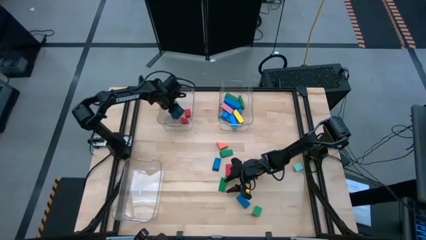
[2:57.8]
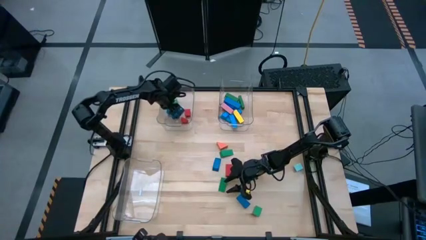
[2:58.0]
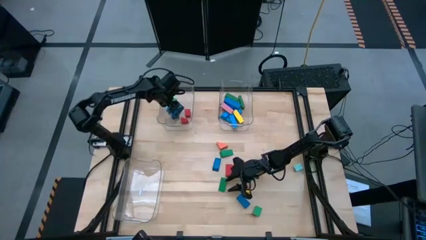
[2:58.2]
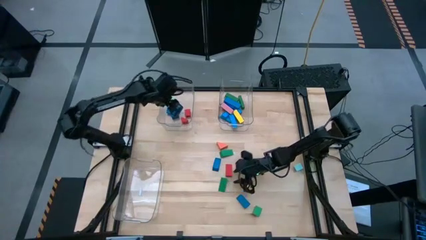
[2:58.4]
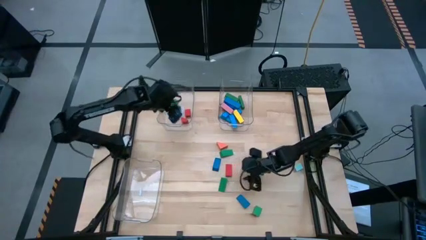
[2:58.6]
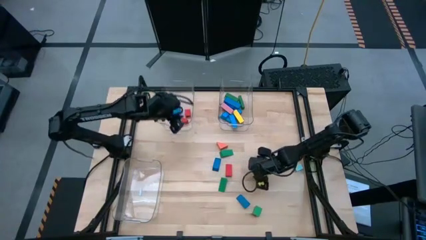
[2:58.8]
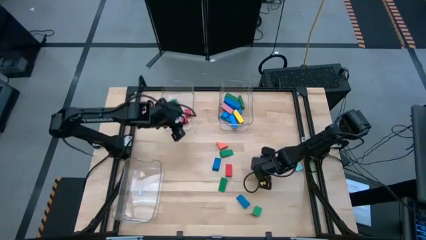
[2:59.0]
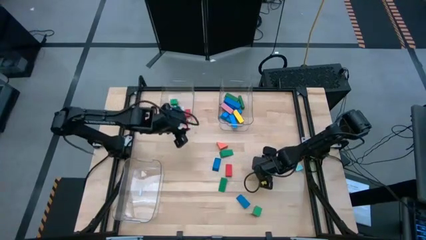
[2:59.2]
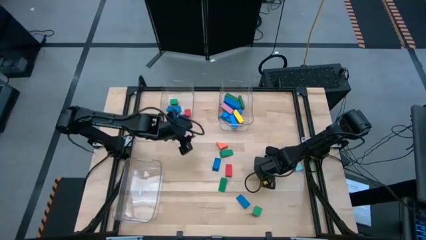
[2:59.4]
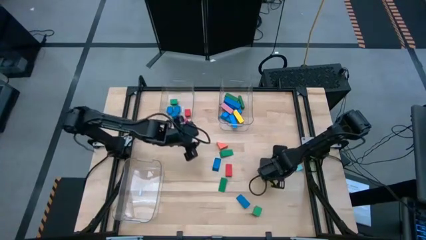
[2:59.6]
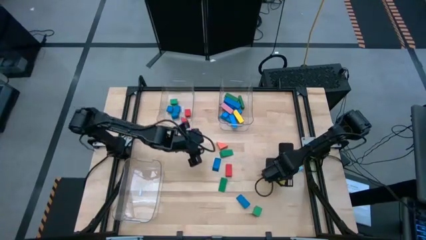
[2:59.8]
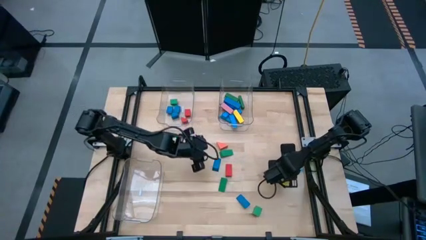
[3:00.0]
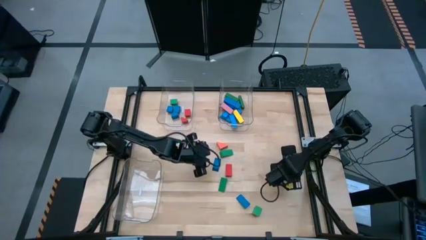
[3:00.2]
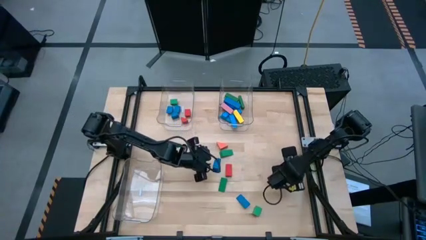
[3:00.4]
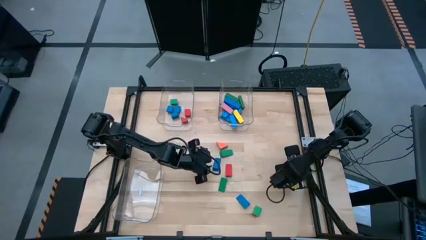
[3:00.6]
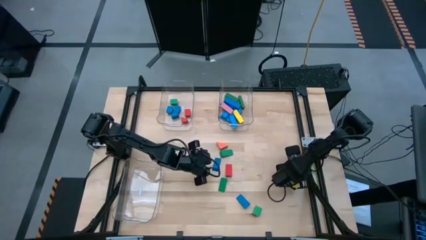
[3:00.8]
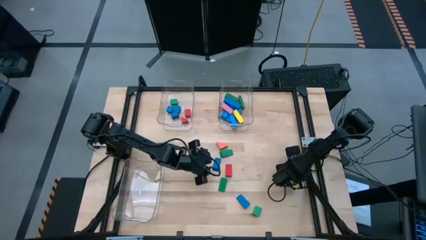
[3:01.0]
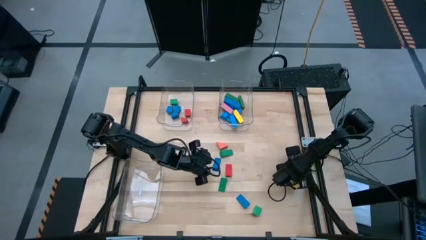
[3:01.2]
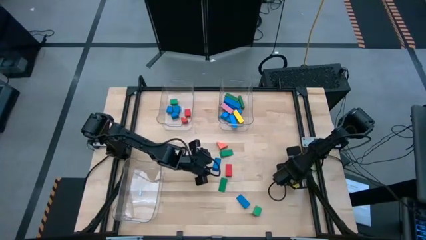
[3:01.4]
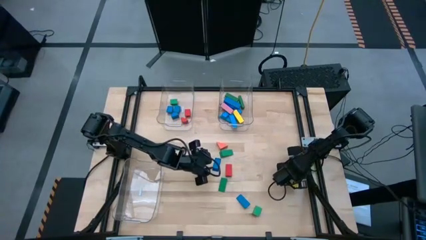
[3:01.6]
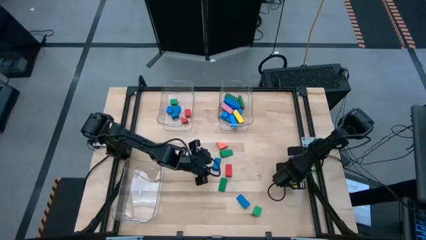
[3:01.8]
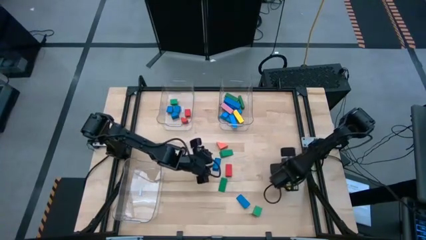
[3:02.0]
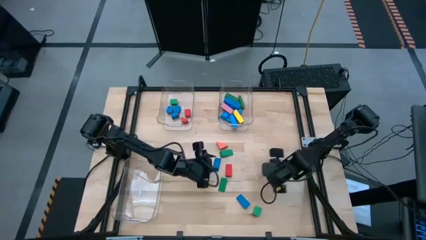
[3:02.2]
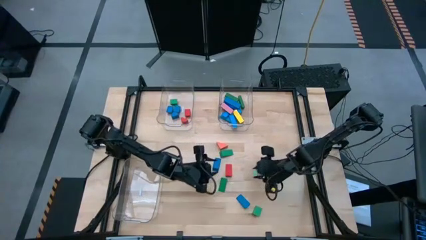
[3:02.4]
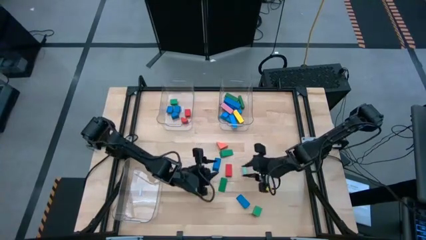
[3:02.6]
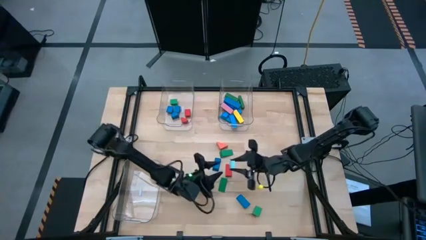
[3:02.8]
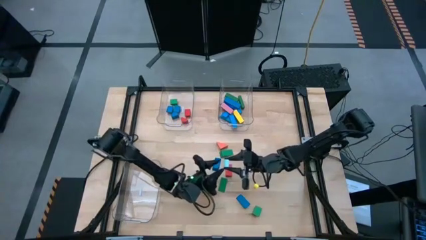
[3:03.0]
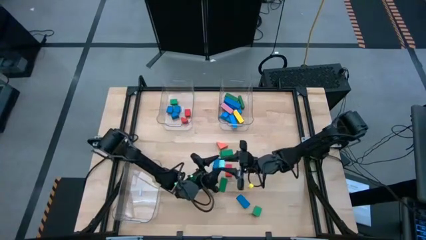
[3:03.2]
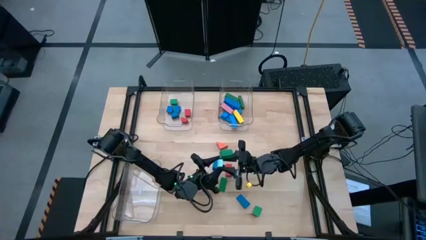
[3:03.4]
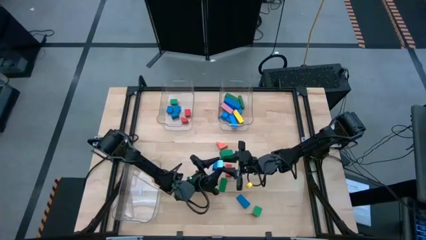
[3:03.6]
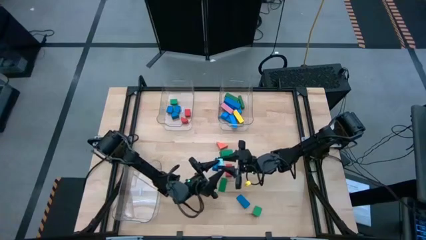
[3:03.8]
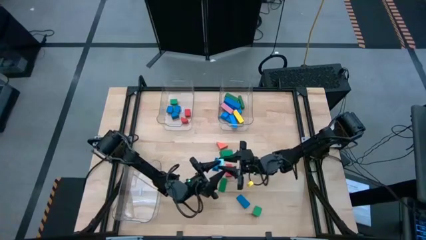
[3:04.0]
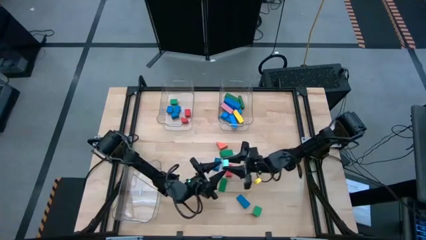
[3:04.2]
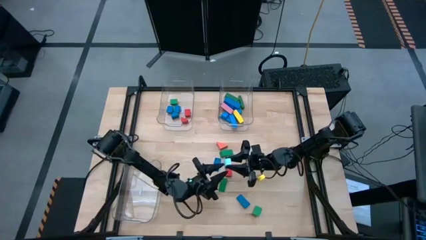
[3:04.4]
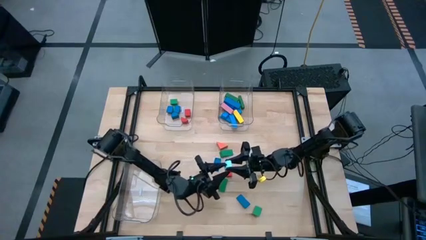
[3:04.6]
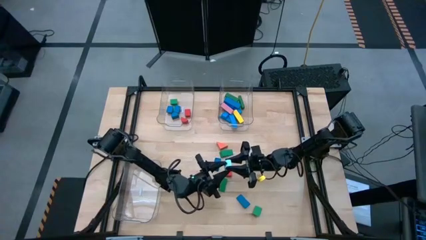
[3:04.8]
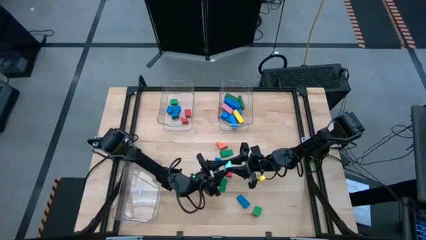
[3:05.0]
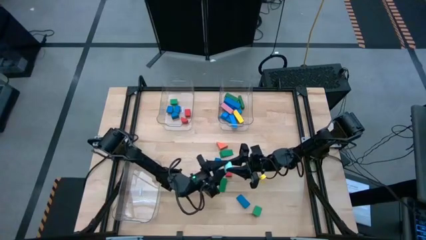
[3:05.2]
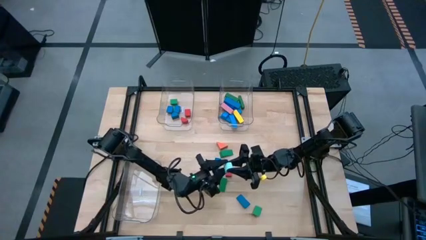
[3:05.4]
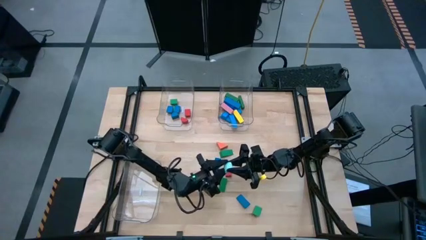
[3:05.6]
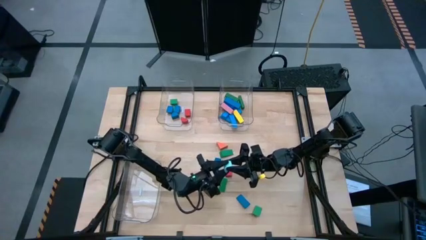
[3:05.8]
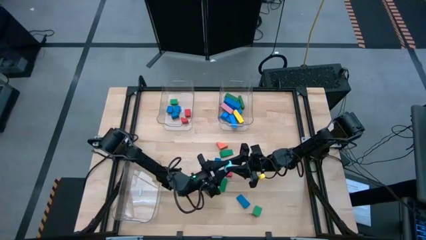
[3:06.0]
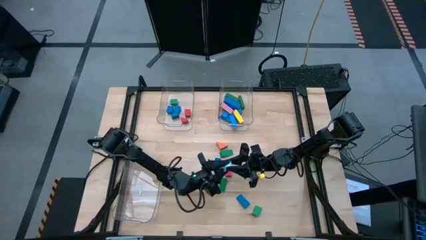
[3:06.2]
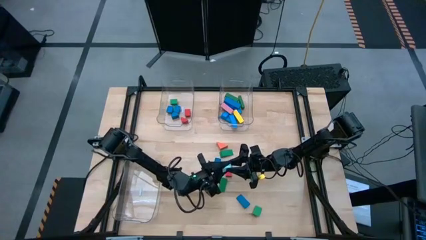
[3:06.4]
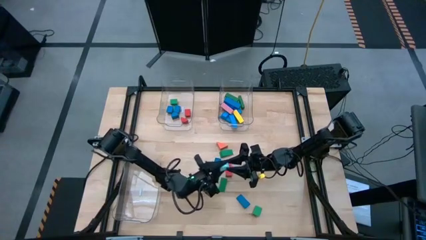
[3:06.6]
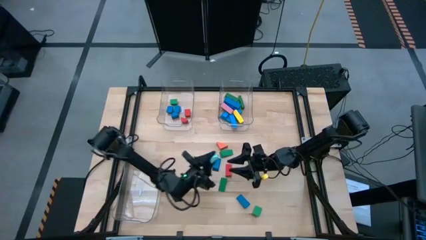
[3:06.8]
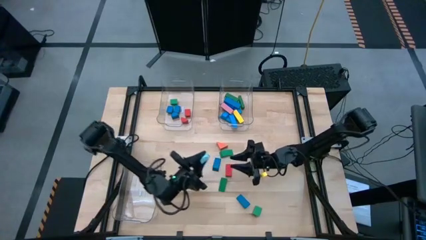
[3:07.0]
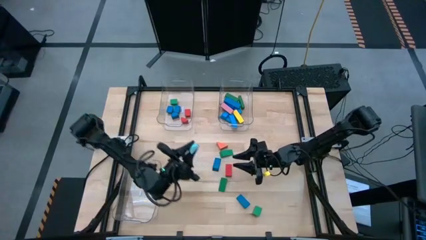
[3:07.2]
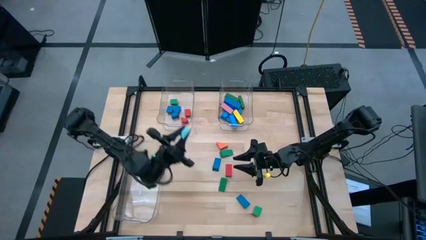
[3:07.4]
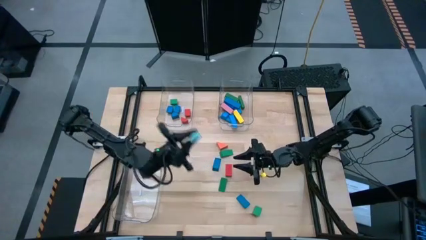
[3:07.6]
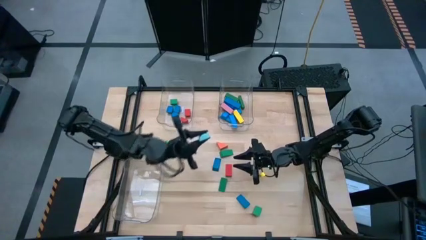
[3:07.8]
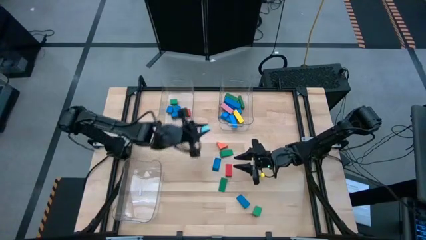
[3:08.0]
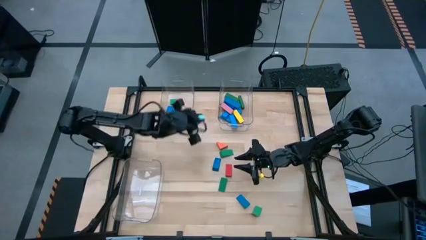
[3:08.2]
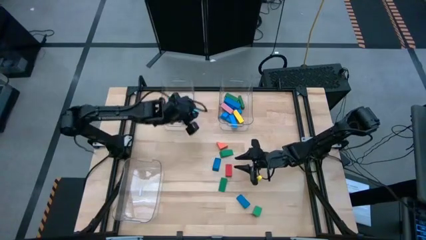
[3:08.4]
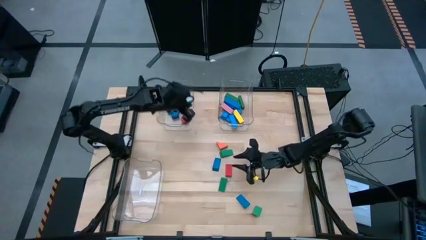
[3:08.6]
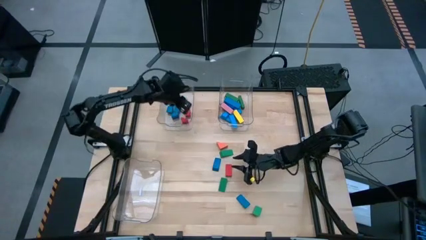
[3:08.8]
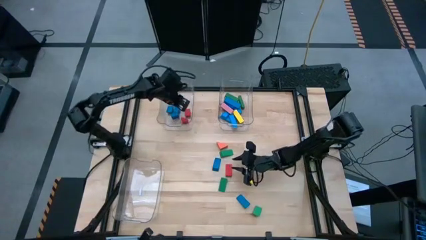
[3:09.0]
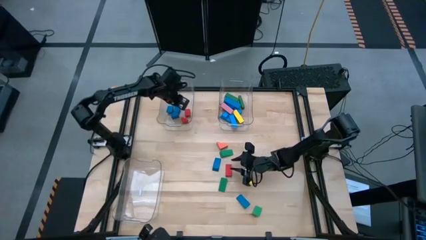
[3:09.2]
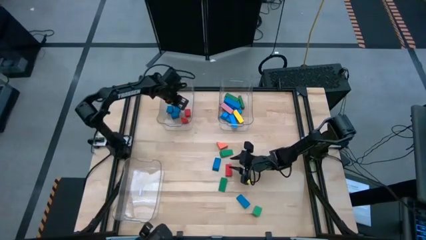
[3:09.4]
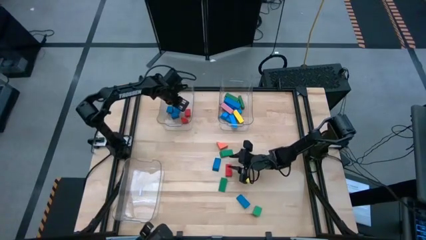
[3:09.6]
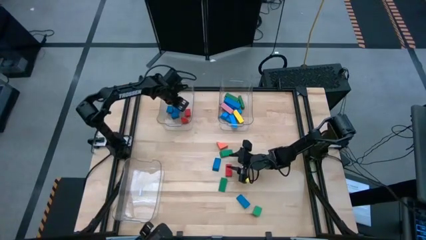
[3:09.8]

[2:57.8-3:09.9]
Task: Sort blocks by size
Put the light blue half cylinder block into the top left transparent bin

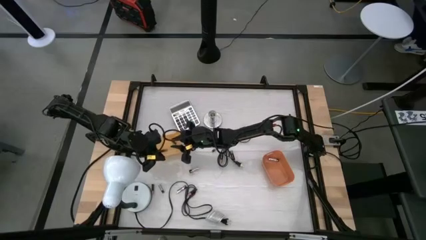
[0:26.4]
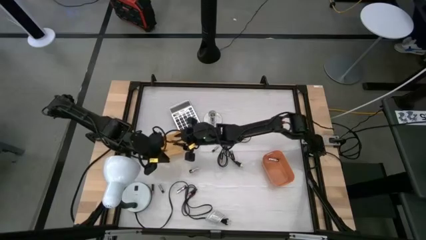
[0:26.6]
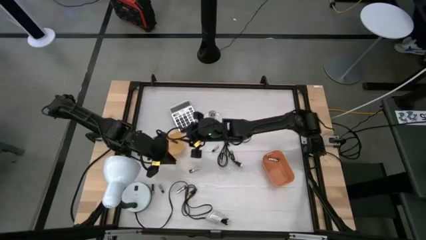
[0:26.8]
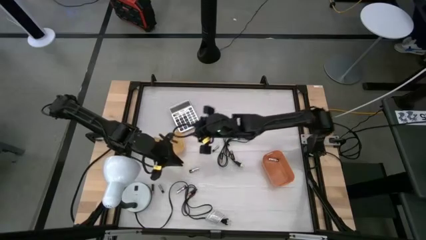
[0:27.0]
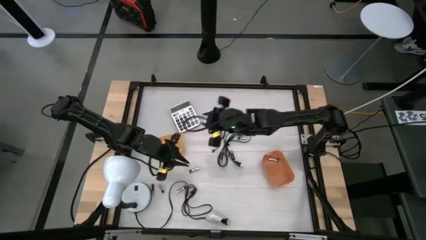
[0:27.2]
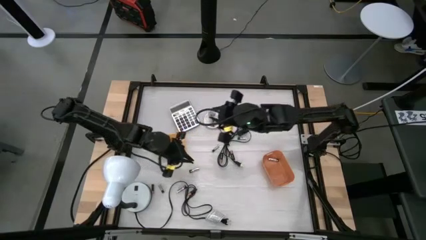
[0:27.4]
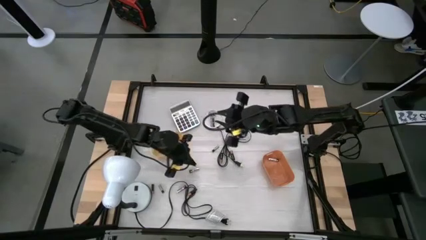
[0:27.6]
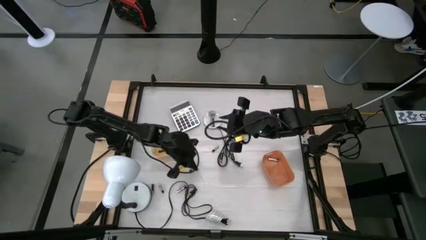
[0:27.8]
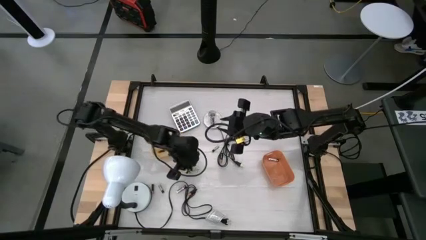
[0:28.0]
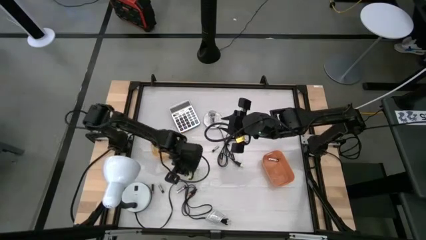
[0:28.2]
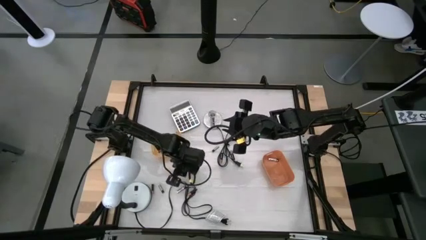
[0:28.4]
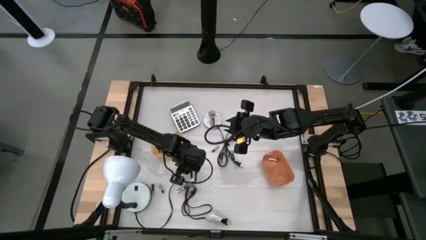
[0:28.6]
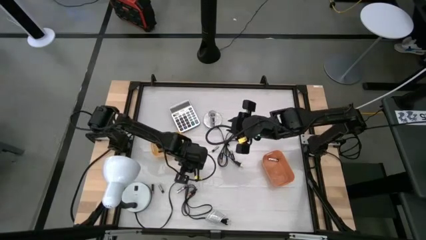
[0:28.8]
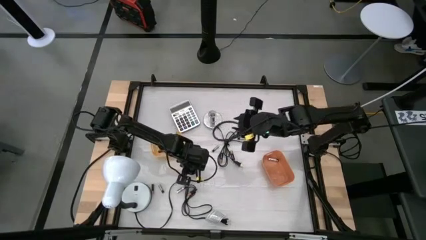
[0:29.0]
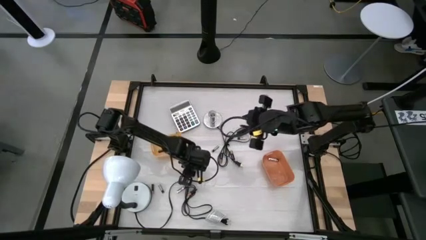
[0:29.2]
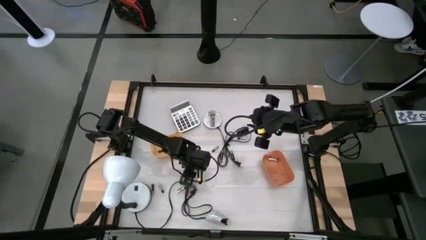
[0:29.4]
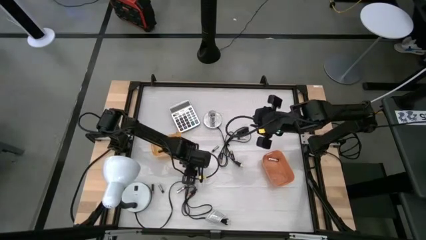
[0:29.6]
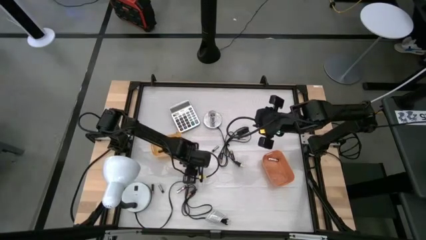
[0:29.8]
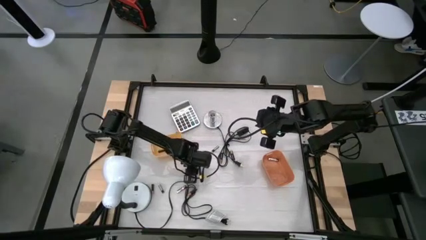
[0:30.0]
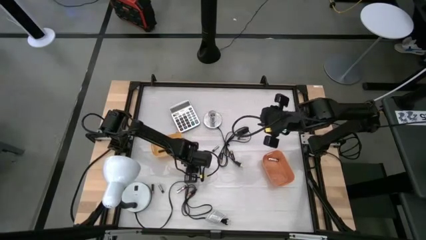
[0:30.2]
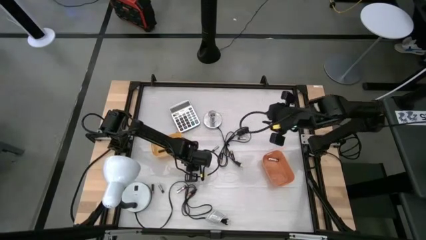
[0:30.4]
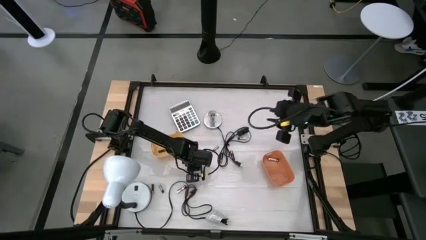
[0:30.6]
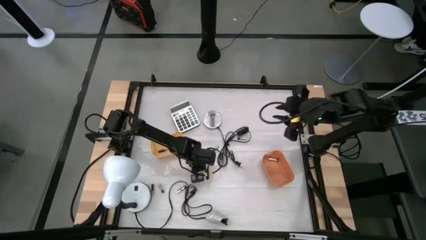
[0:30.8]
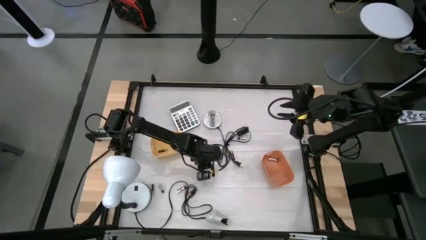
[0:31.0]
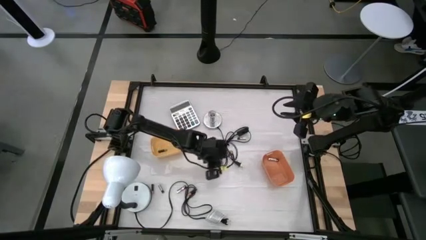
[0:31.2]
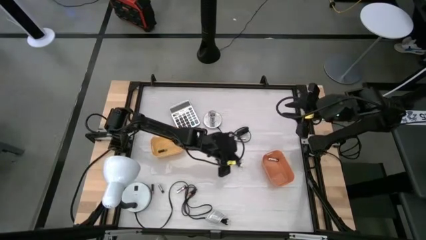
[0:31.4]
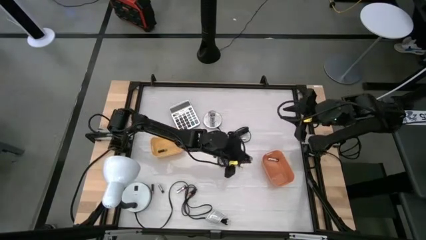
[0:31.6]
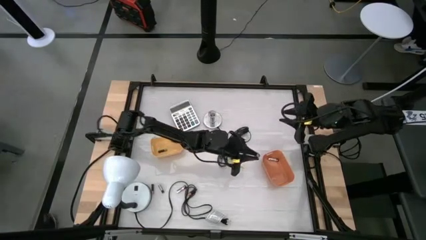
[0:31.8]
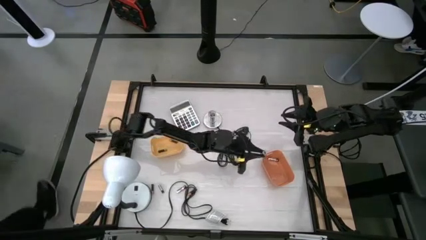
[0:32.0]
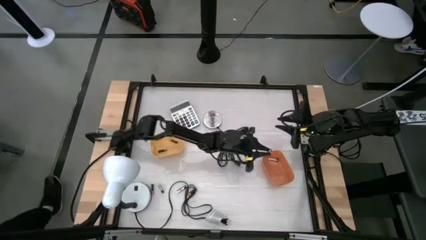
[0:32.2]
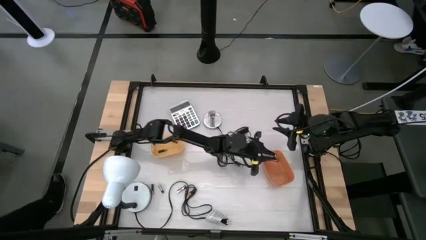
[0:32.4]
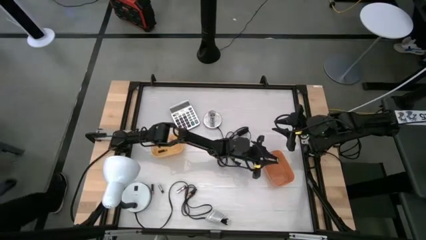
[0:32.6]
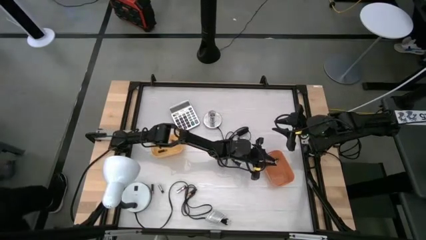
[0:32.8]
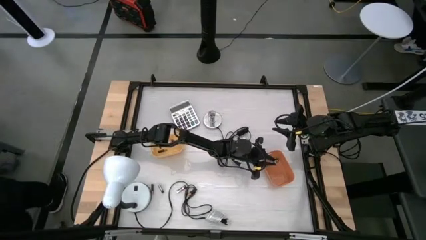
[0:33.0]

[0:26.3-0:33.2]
Task: Sort batteries
Put the silver battery into the orange bin
